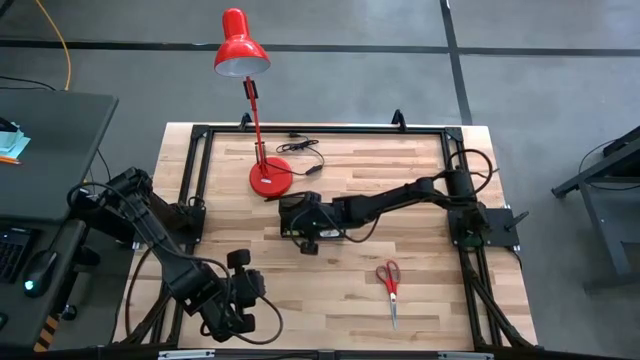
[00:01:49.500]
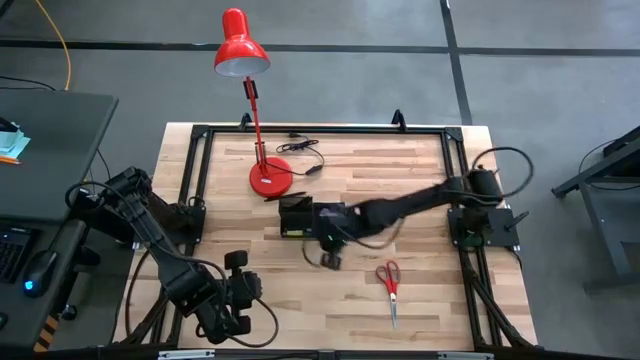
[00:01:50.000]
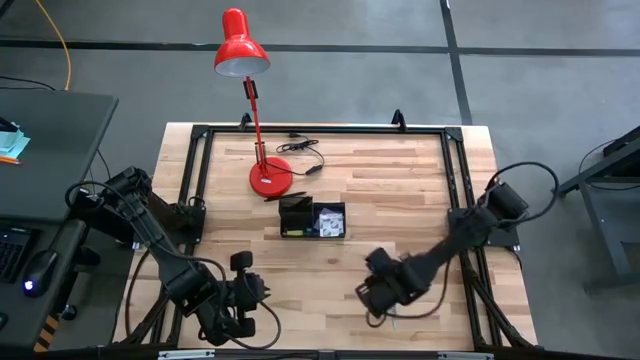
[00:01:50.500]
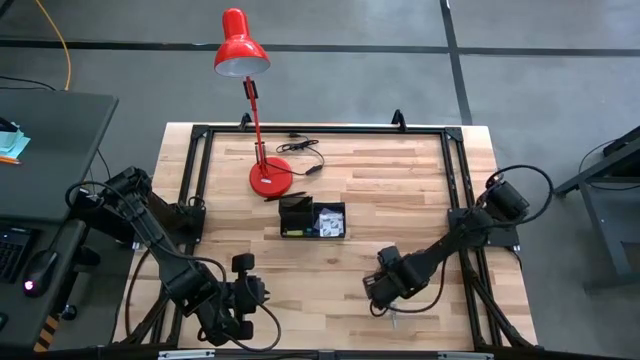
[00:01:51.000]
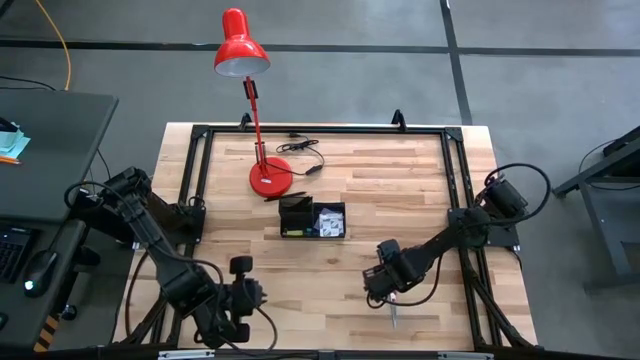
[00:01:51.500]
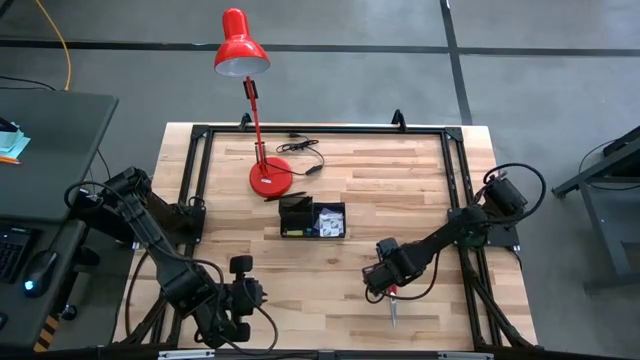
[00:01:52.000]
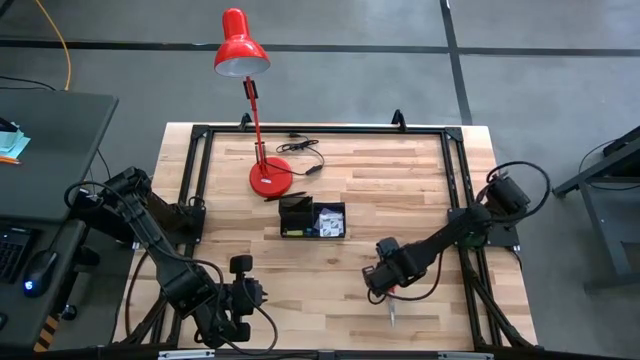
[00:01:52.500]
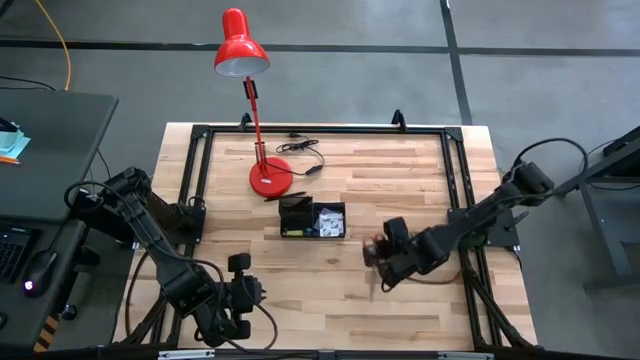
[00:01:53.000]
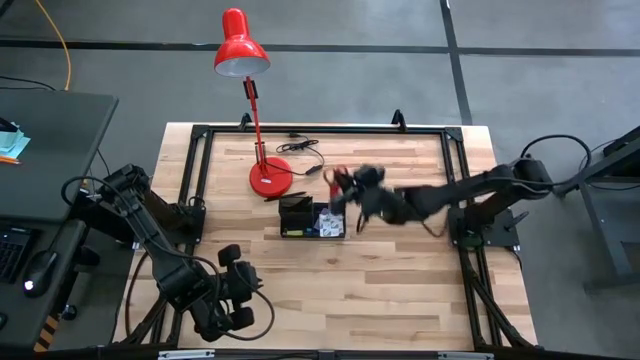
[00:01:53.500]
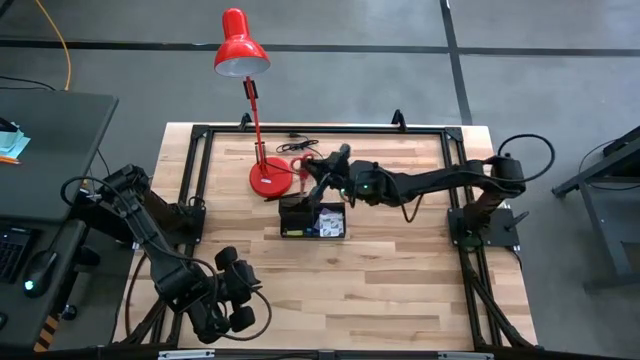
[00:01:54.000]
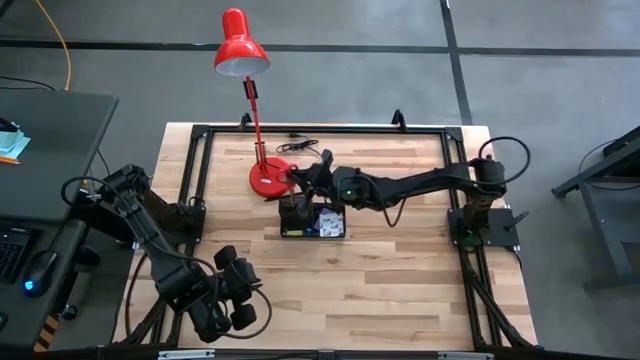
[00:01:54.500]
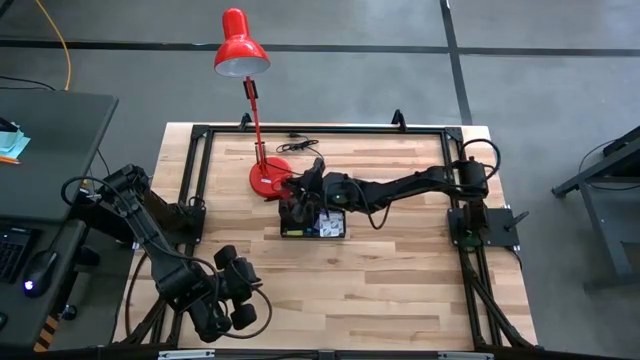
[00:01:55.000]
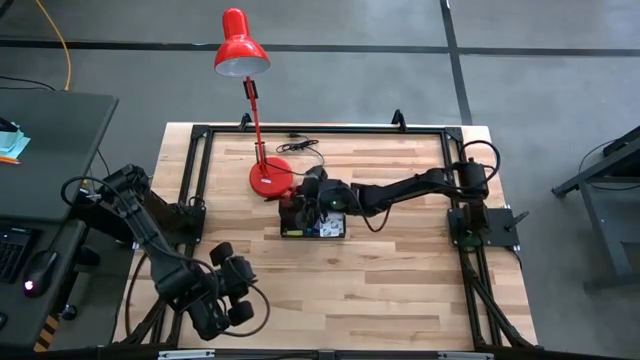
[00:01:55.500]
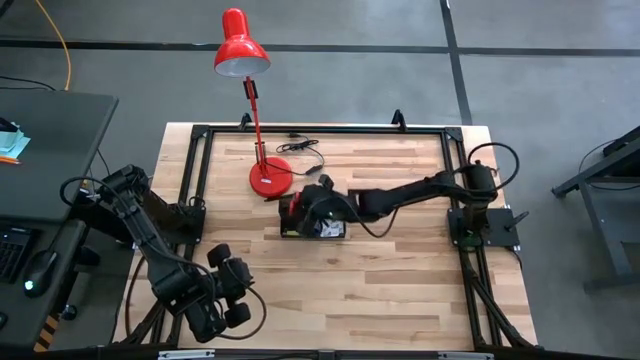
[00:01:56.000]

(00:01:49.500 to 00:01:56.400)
Task: Pick and place office supplies into organizer
Put the scissors into the desk organizer

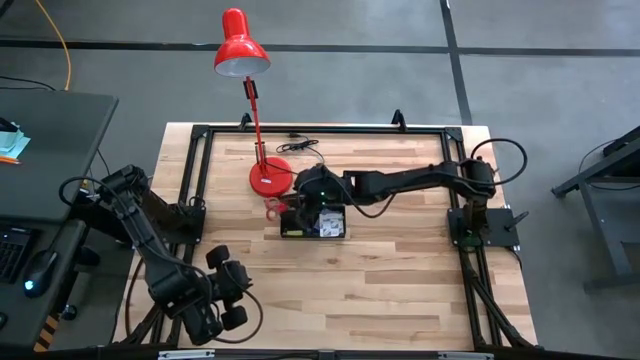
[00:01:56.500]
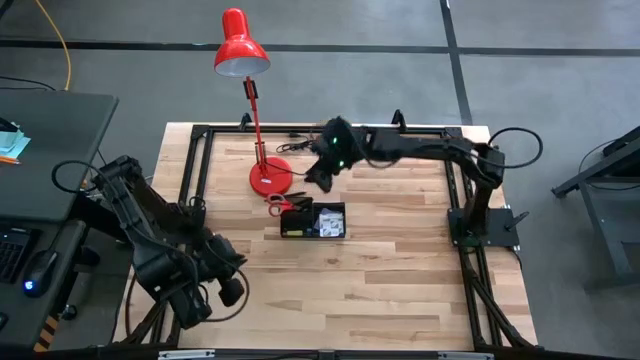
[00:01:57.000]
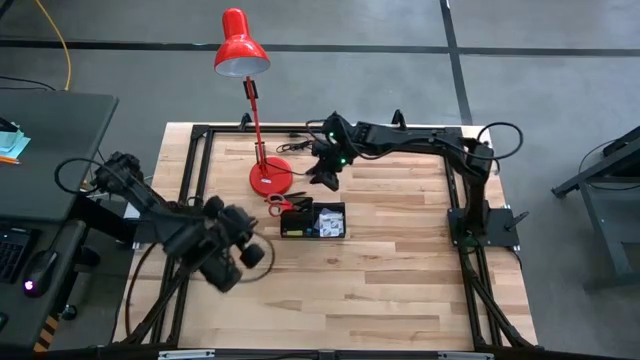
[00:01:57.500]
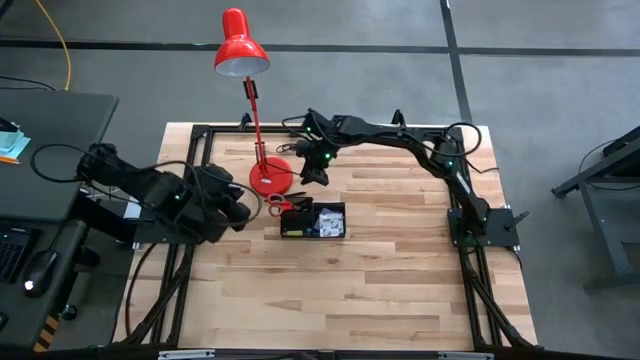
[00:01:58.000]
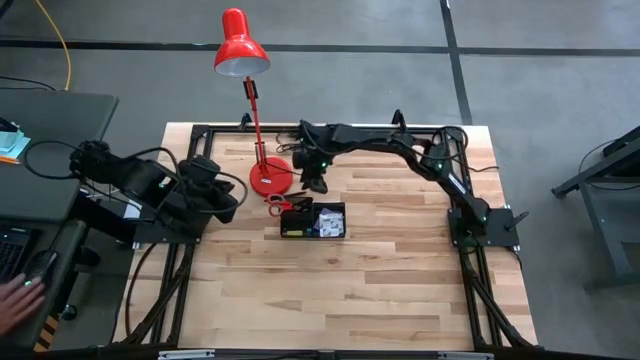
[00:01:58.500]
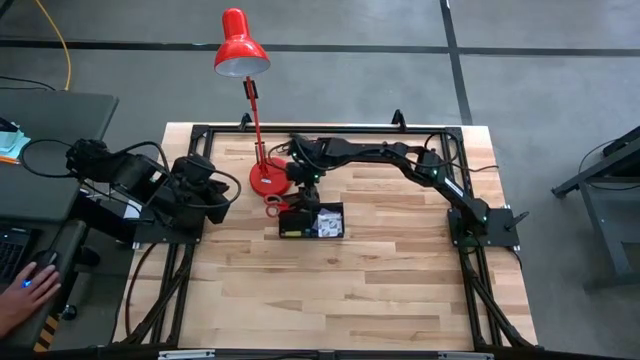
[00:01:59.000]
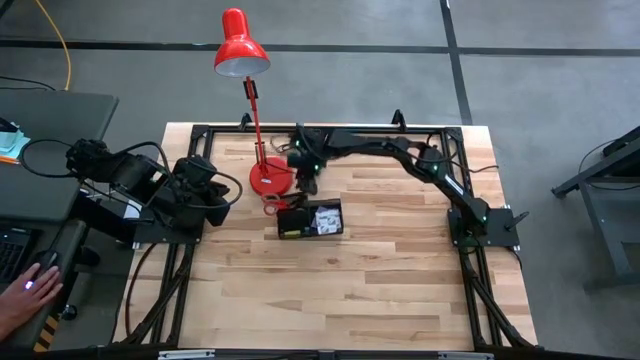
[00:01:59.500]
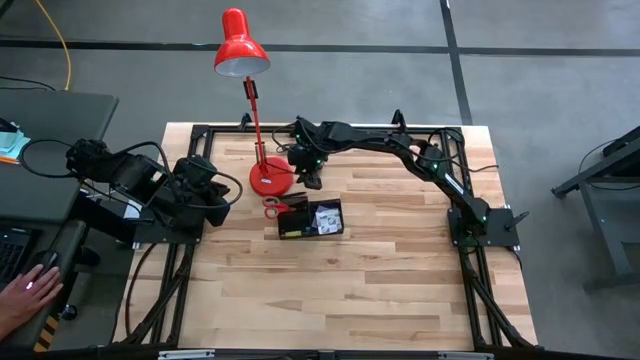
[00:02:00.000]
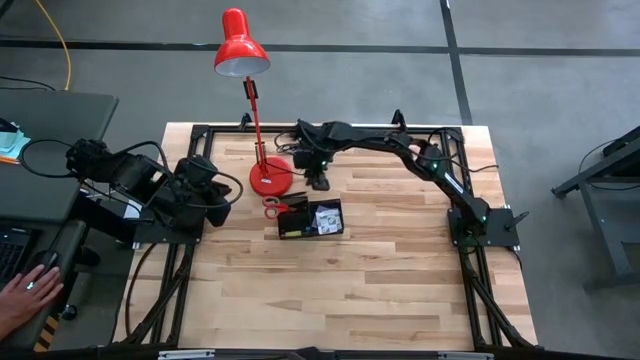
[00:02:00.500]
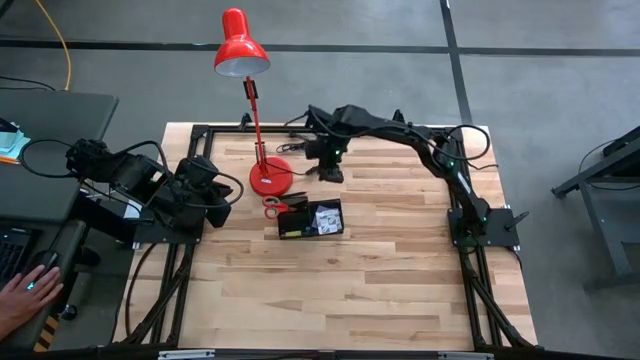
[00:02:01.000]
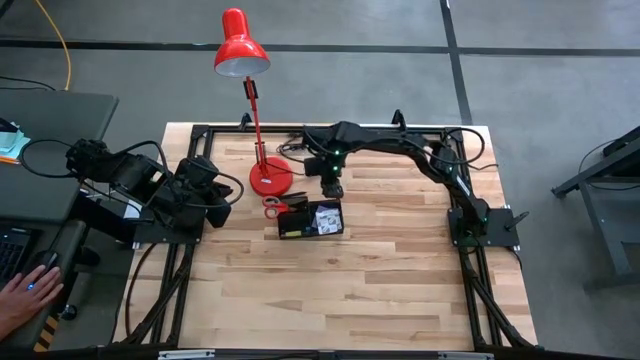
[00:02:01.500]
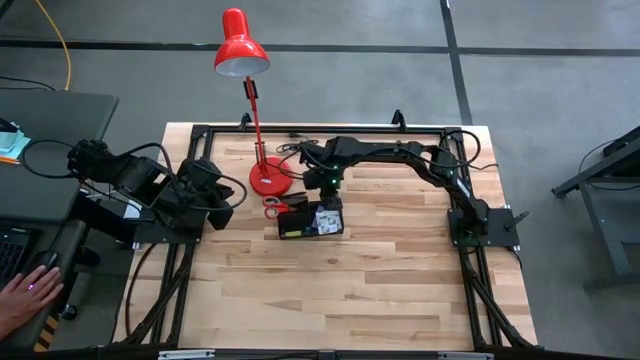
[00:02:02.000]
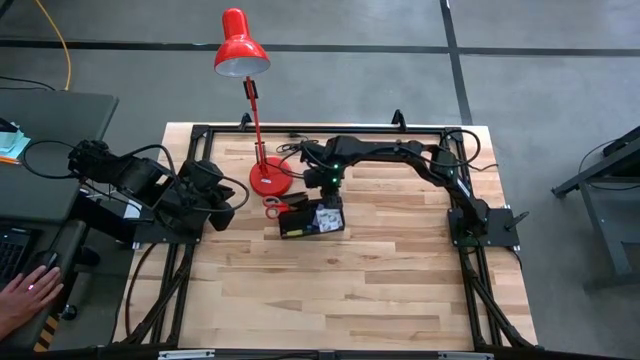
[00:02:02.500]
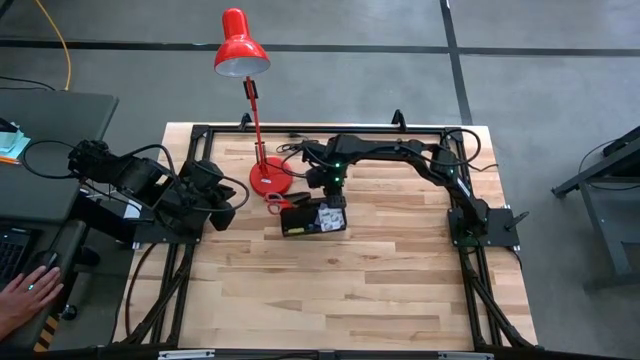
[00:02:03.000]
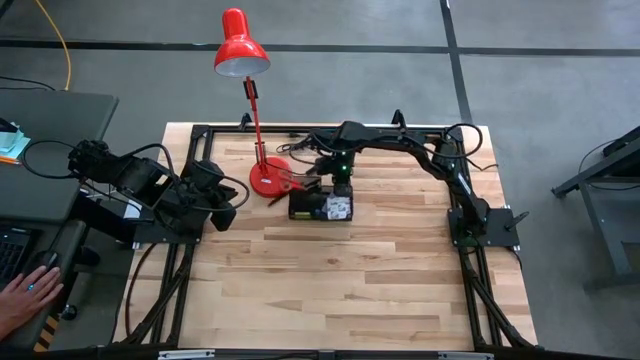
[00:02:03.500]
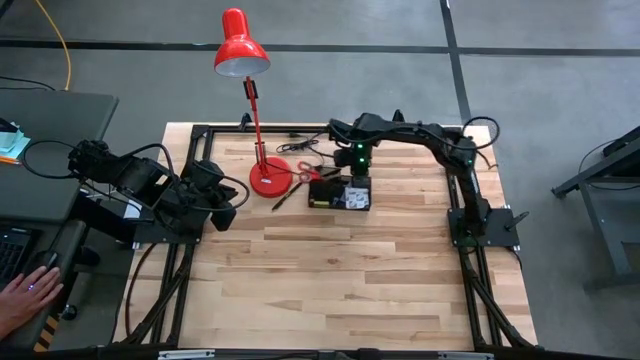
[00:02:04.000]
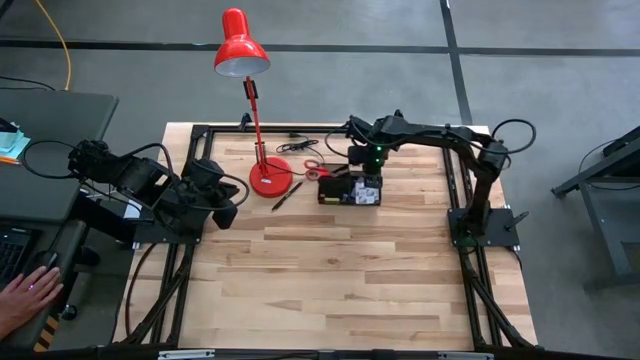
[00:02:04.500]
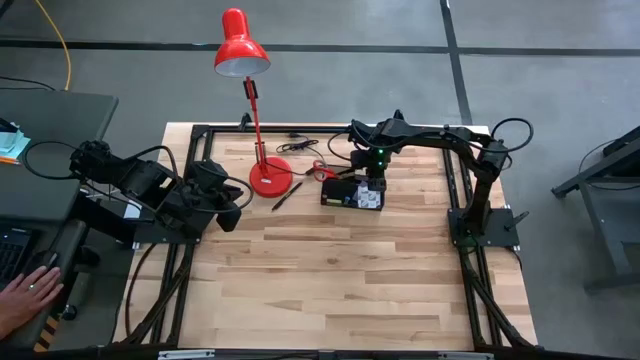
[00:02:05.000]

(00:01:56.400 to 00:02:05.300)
Move the desk organizer to the top center of the table
